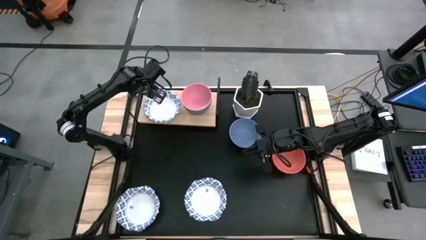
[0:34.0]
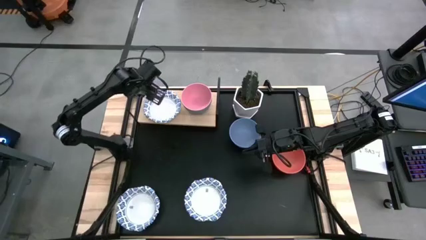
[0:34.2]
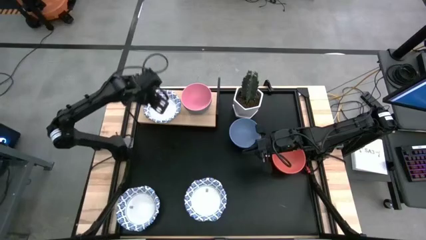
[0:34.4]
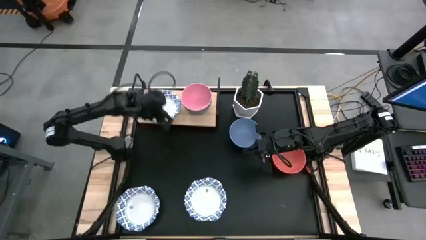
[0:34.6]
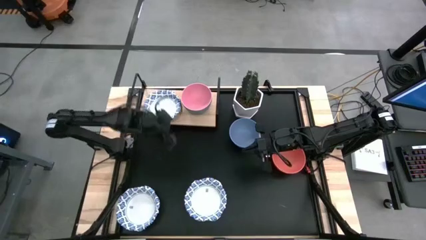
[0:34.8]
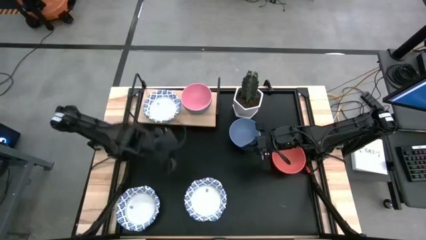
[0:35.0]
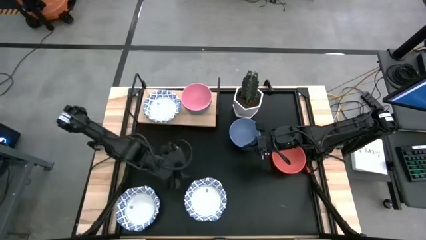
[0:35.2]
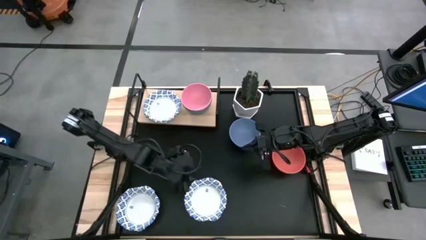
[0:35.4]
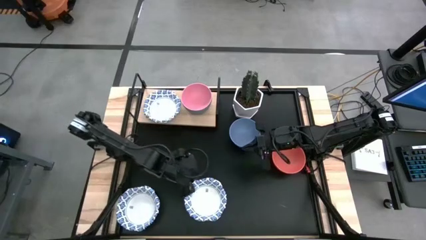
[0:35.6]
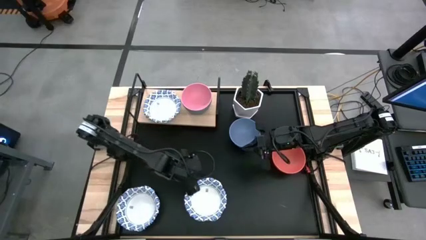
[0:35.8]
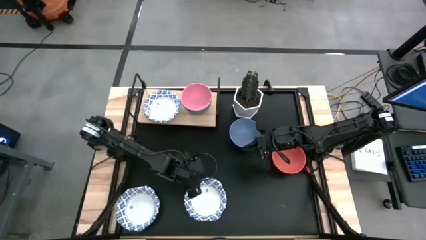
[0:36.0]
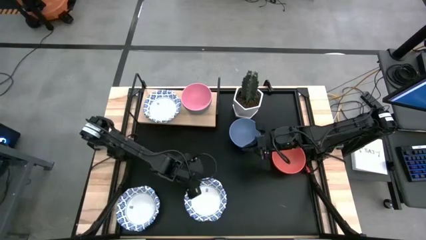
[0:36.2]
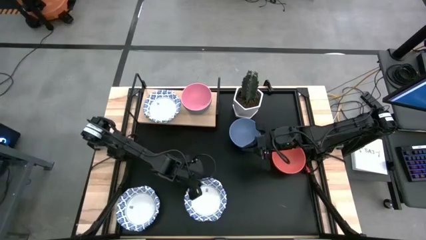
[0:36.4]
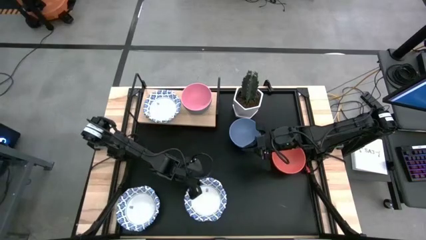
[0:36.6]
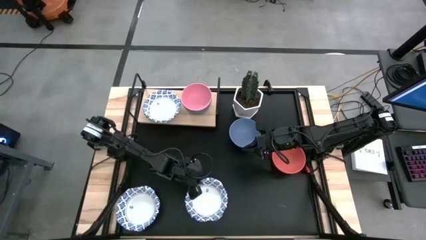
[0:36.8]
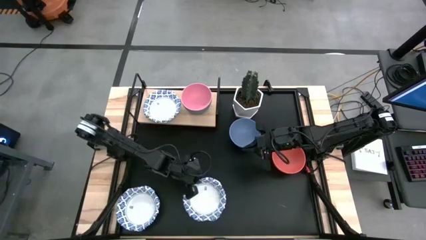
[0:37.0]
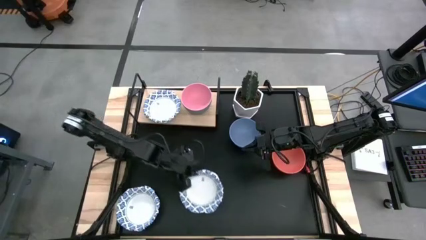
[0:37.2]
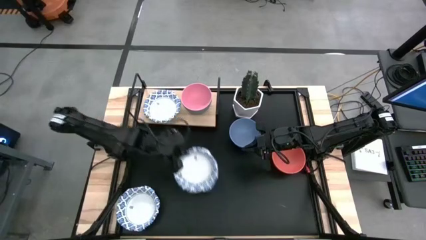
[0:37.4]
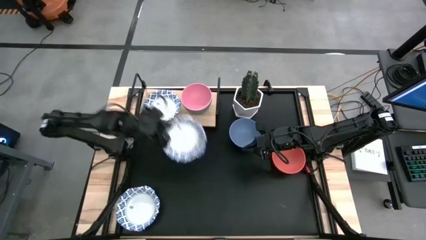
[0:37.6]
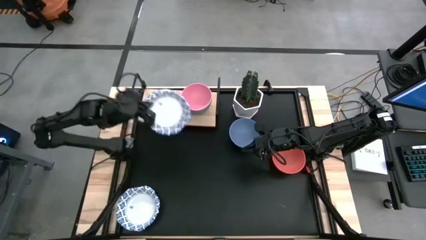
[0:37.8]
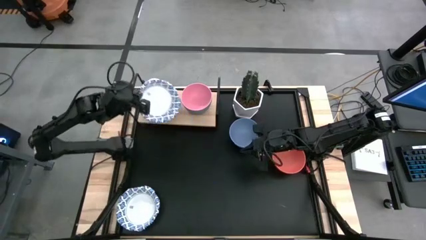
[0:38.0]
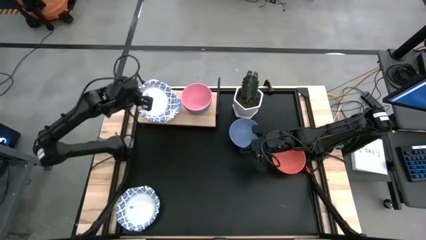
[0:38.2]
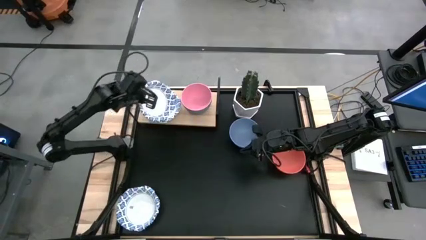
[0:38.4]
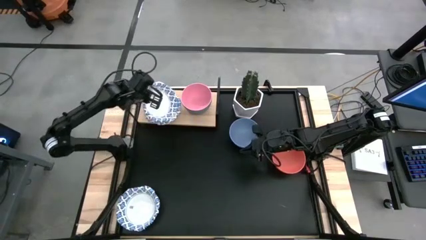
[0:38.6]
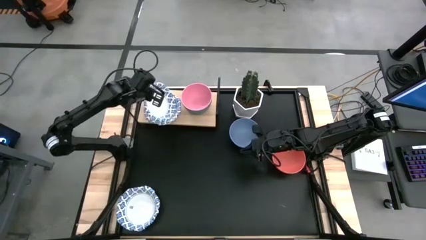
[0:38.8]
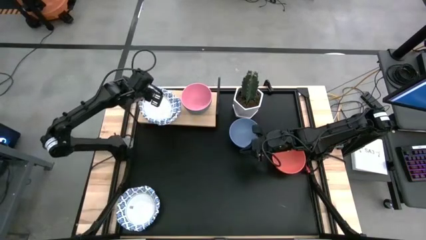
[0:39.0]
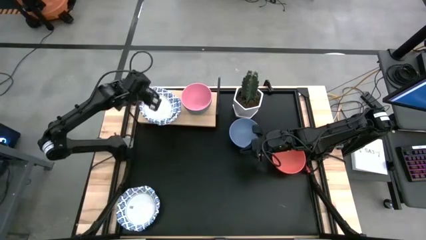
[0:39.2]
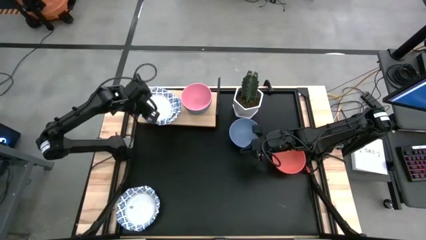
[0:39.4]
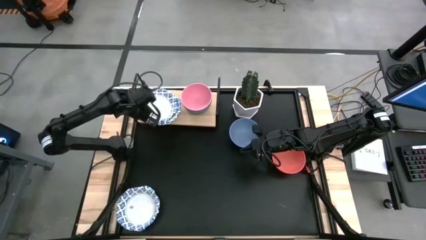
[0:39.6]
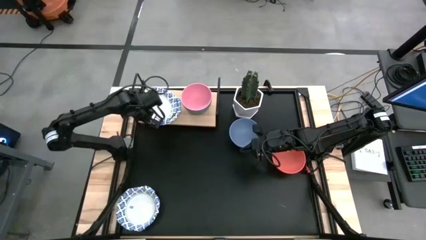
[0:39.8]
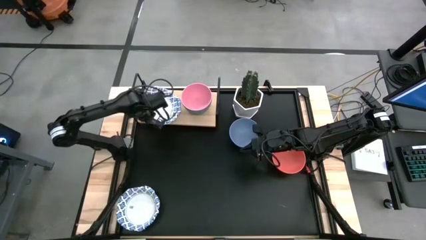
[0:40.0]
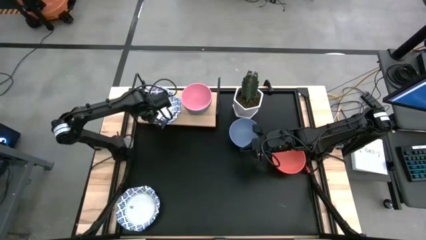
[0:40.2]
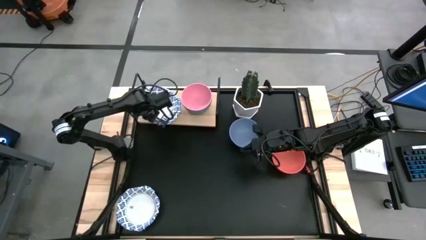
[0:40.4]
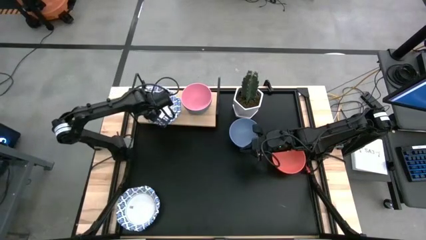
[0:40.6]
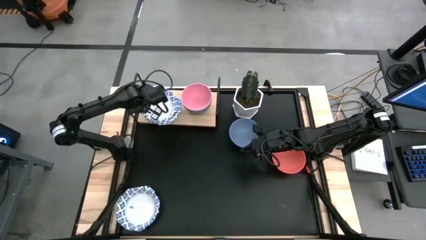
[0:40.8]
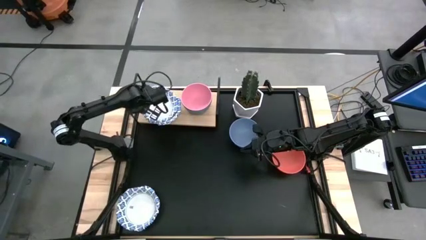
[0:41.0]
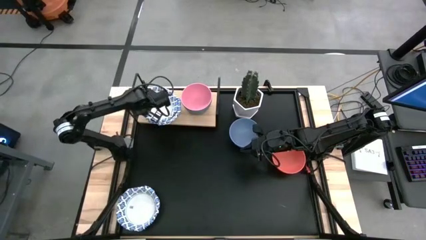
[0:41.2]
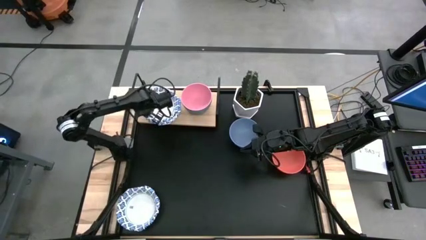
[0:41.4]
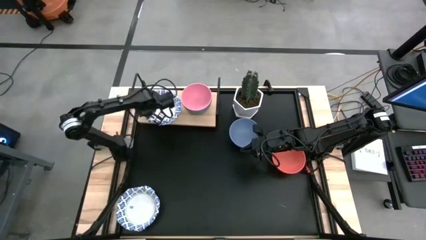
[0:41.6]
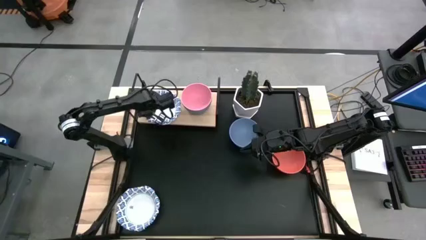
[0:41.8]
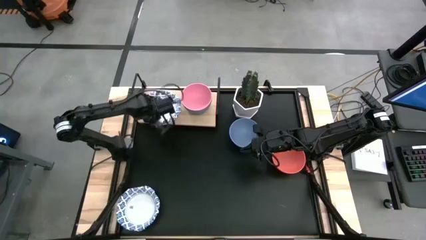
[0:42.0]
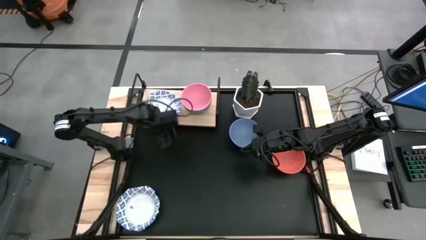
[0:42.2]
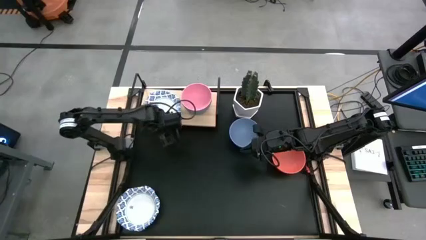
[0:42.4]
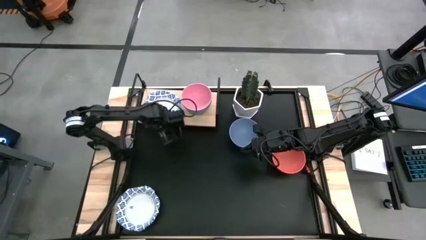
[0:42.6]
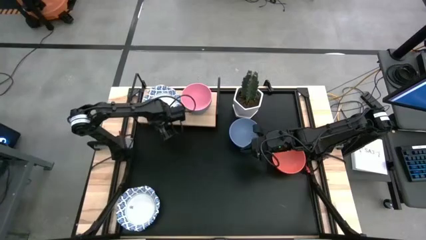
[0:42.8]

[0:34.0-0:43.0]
Task: Place and stack bowls onto a shelf
Stack the right white patterned paper bowl on top of the white patterned paper bowl on the shelf

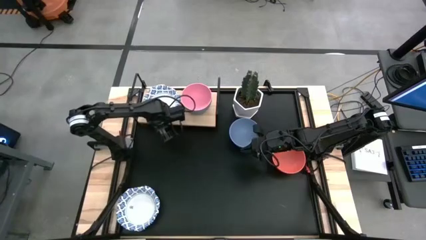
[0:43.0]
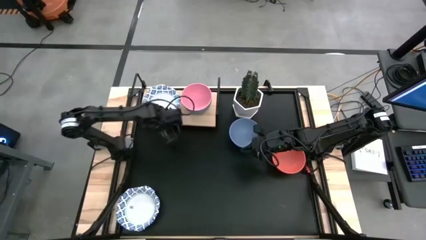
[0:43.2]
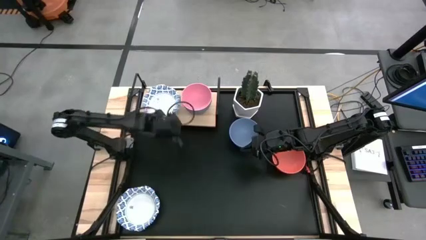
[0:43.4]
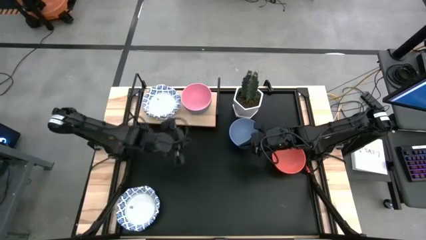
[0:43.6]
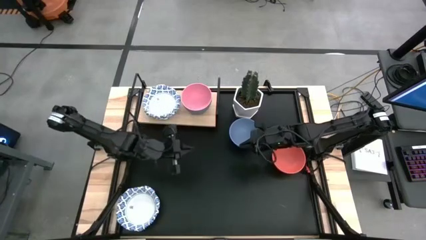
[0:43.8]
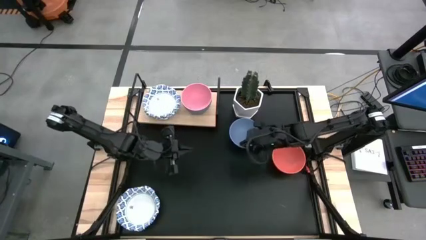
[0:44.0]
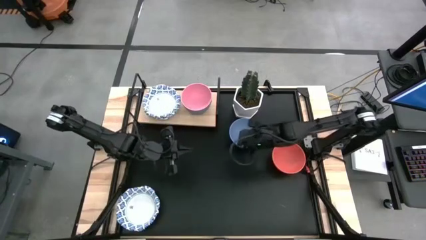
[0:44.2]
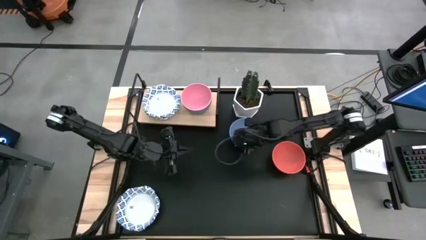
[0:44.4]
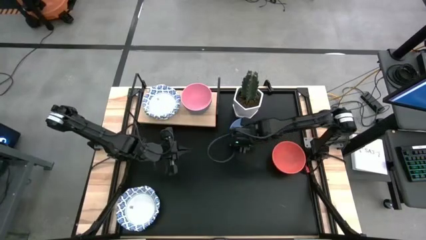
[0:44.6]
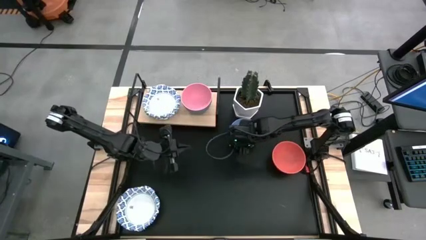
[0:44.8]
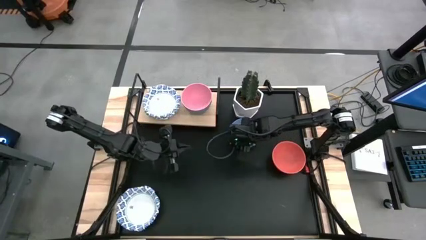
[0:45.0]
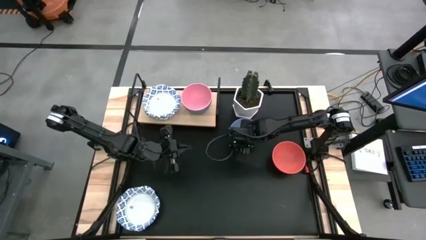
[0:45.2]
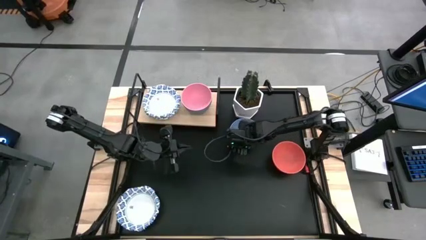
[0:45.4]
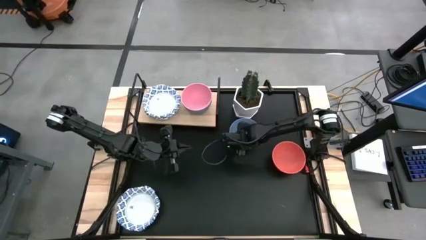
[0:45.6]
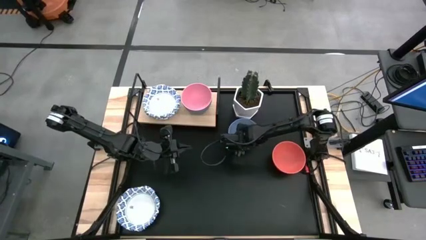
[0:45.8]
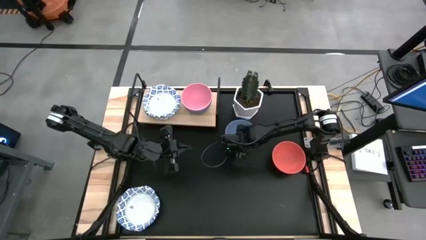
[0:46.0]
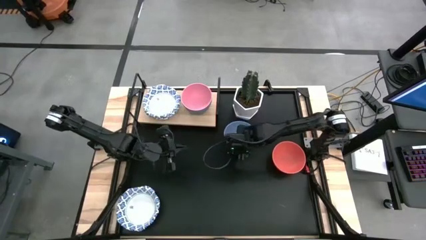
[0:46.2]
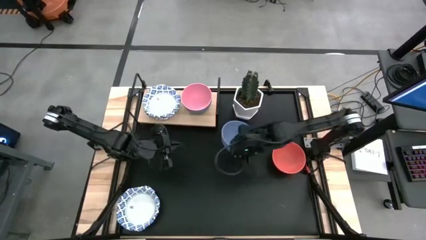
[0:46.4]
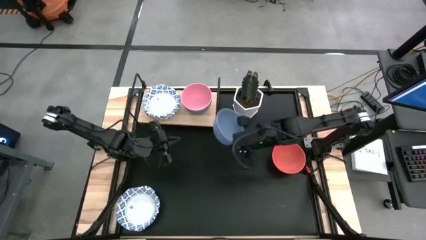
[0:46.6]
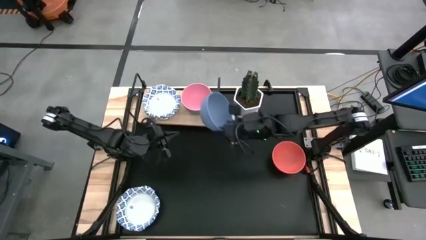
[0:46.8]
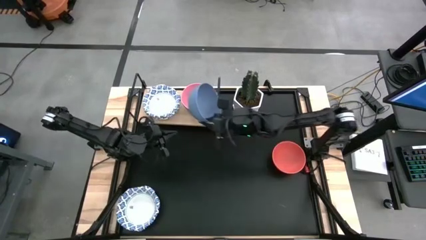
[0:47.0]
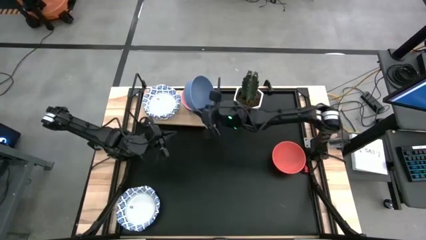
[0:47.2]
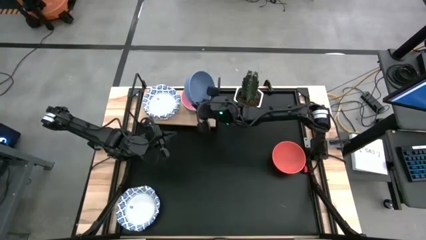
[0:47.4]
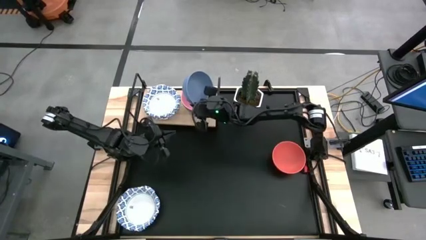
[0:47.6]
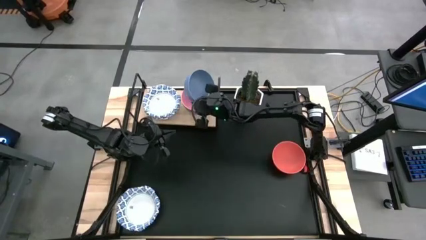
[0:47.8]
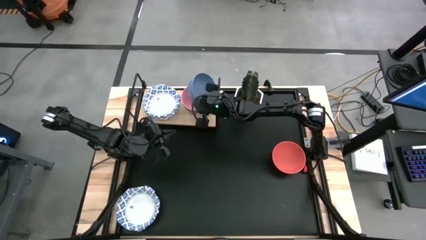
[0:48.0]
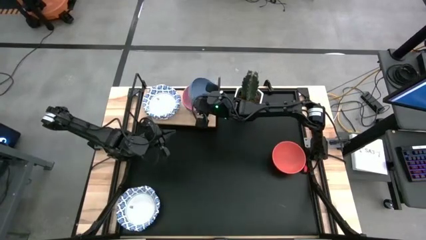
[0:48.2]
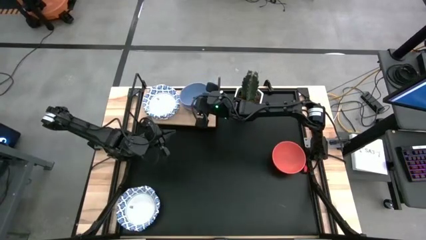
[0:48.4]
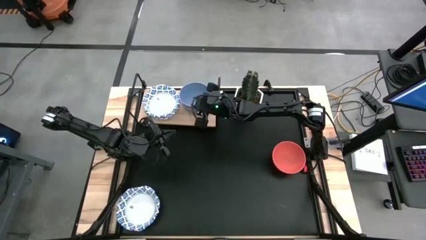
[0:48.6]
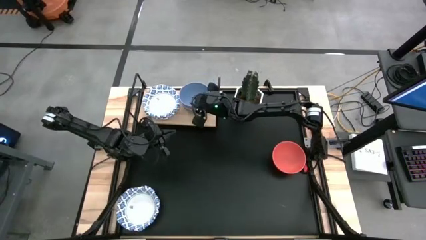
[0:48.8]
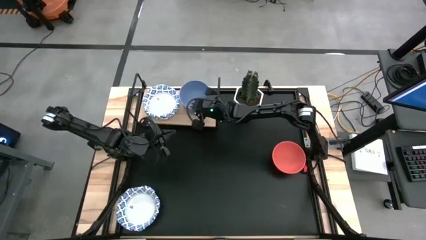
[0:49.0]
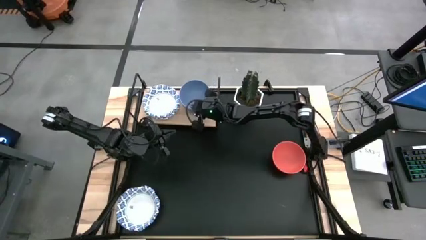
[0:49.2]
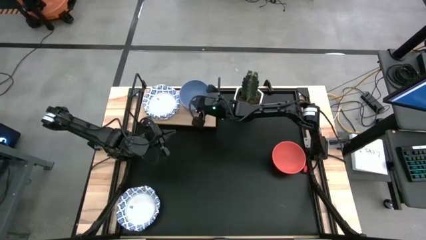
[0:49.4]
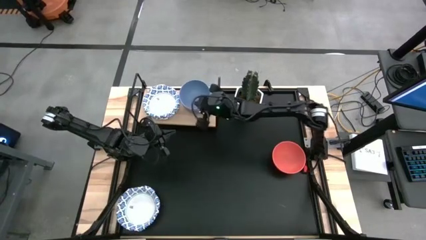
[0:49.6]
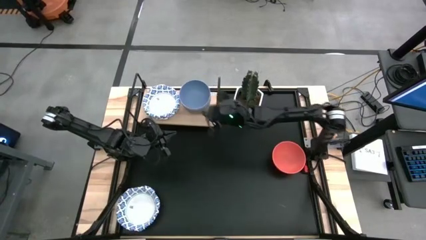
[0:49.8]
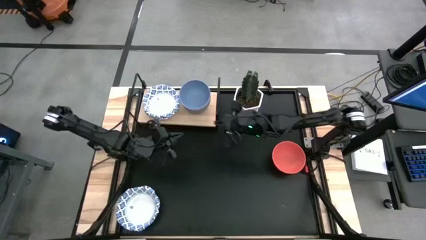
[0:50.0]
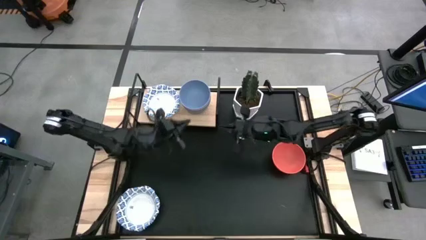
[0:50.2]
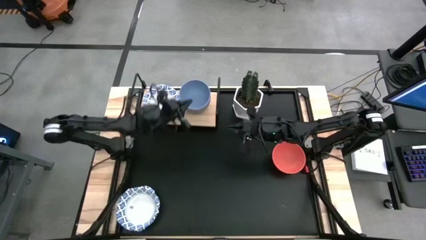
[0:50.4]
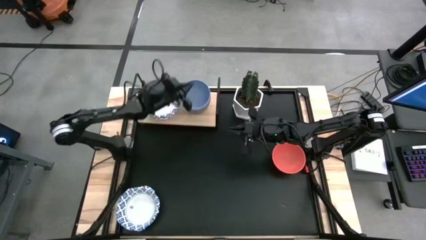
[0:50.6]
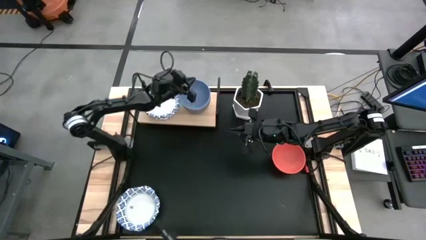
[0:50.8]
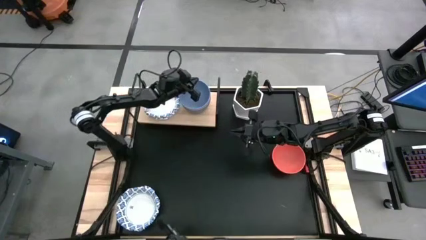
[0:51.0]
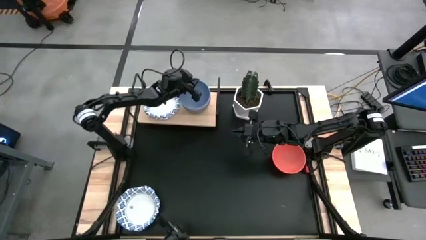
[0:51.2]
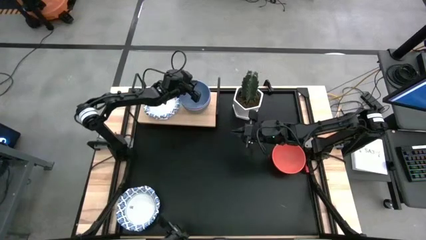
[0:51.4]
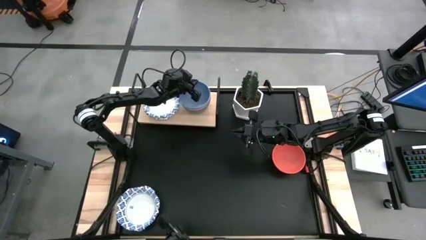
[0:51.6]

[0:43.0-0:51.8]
Stack the blue bowl on top of the pink bowl on the shelf
